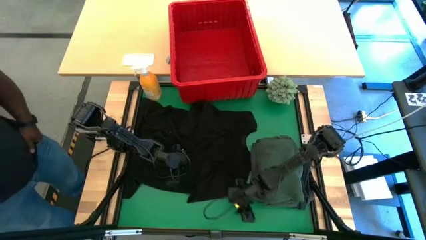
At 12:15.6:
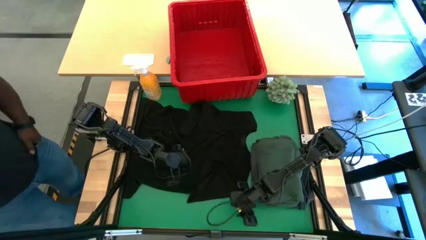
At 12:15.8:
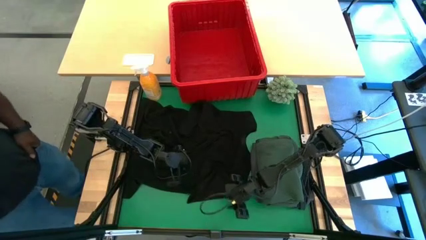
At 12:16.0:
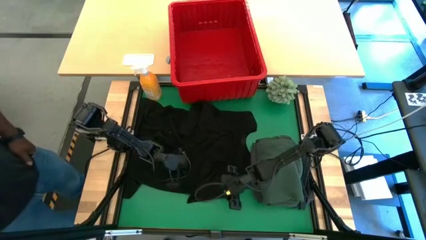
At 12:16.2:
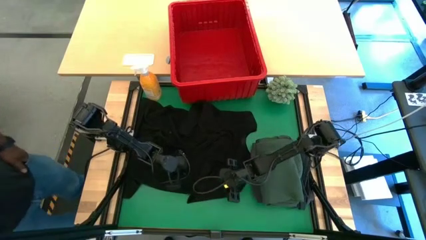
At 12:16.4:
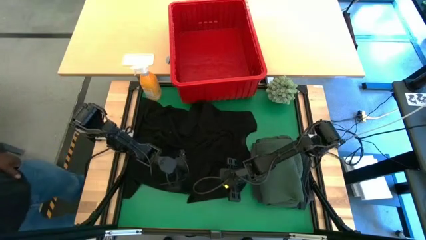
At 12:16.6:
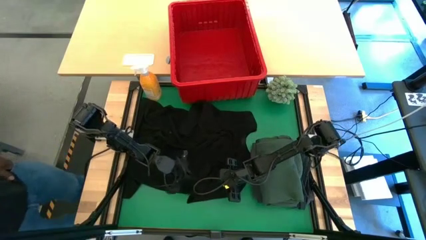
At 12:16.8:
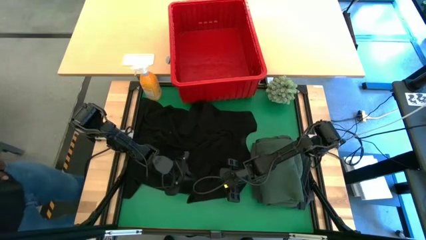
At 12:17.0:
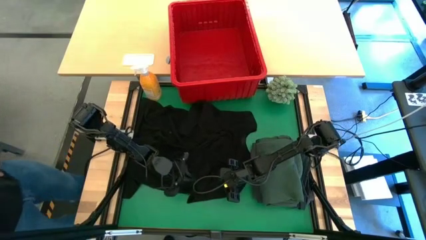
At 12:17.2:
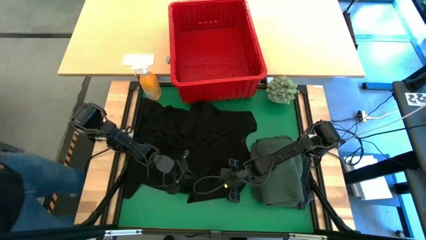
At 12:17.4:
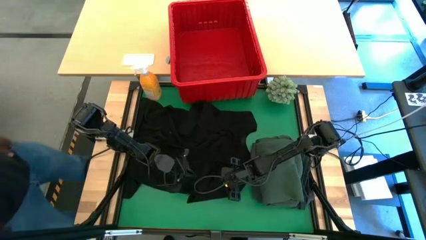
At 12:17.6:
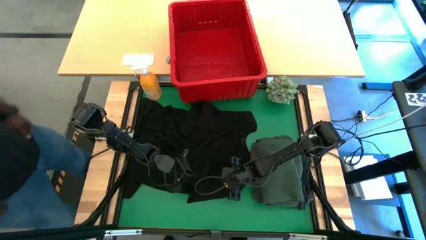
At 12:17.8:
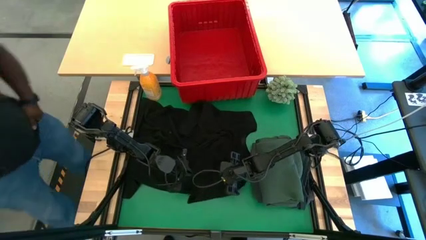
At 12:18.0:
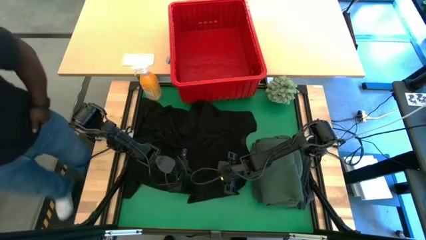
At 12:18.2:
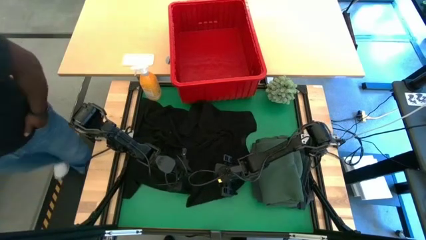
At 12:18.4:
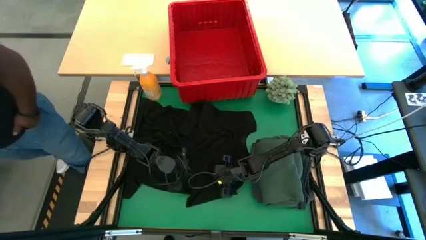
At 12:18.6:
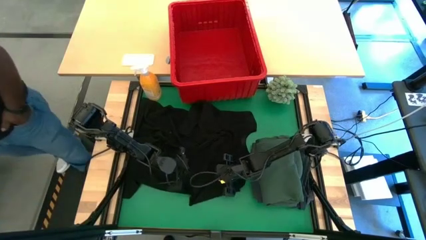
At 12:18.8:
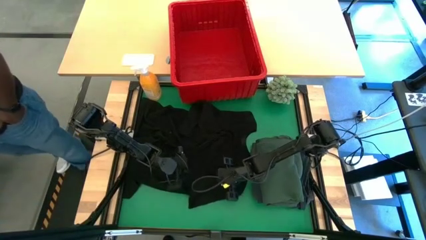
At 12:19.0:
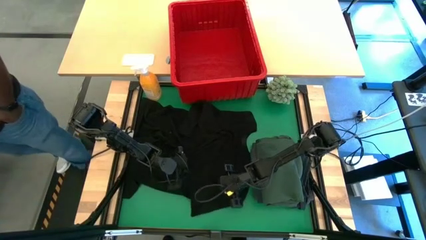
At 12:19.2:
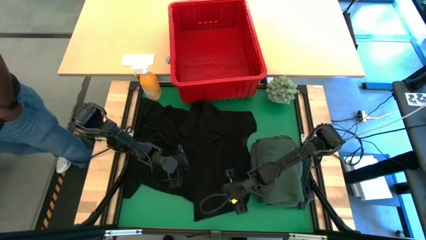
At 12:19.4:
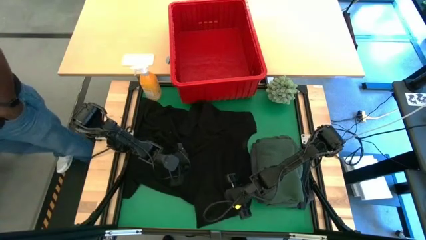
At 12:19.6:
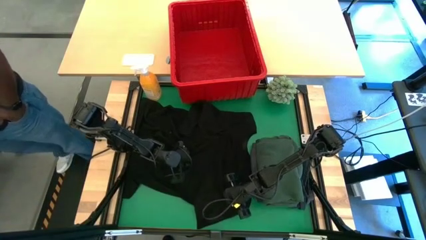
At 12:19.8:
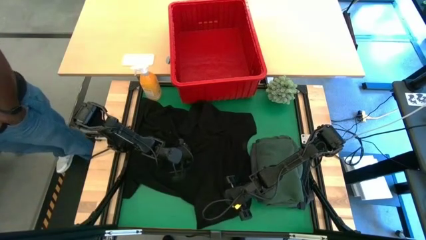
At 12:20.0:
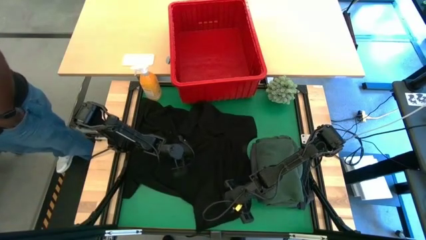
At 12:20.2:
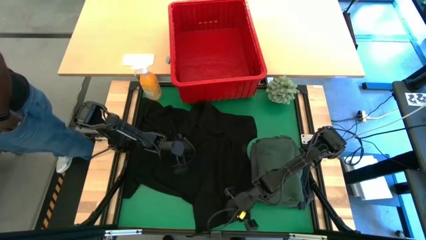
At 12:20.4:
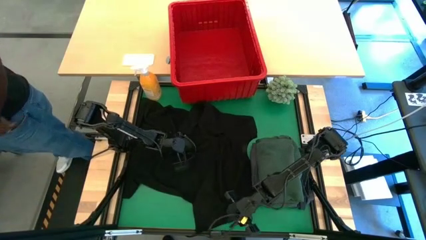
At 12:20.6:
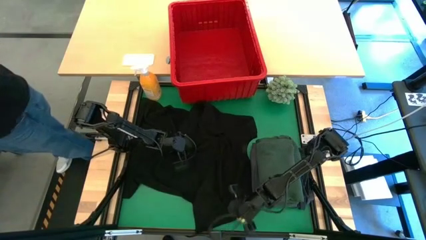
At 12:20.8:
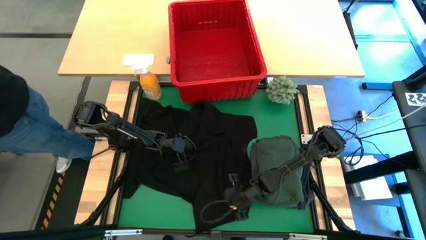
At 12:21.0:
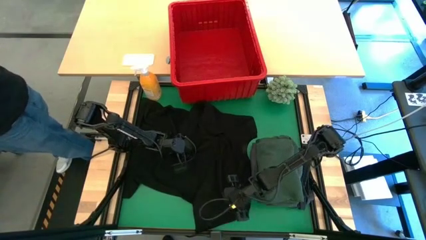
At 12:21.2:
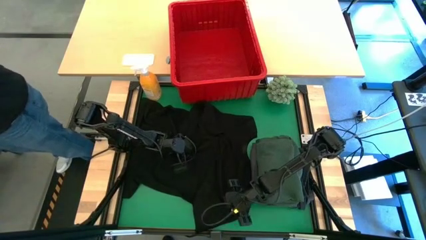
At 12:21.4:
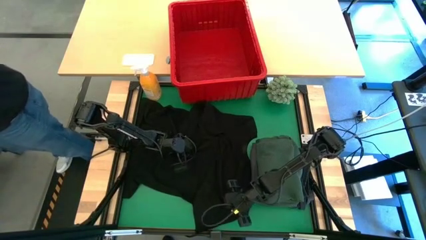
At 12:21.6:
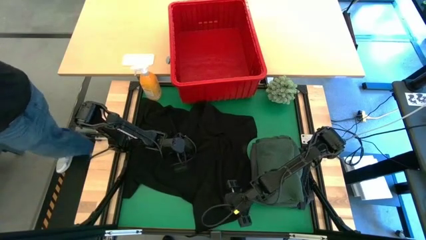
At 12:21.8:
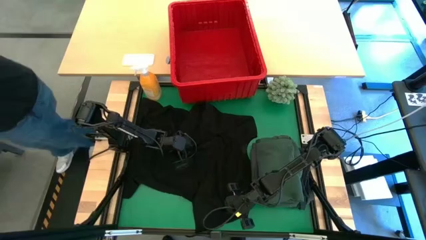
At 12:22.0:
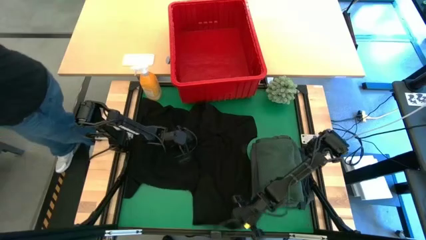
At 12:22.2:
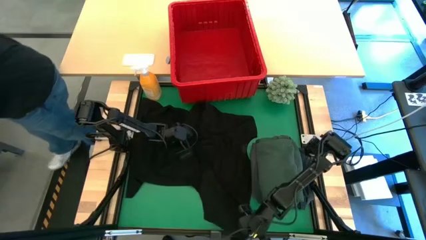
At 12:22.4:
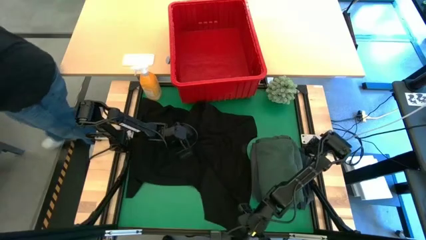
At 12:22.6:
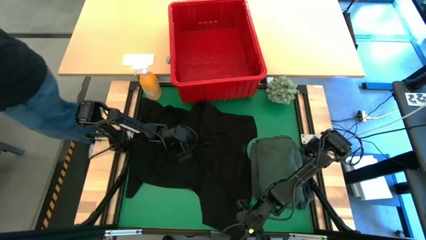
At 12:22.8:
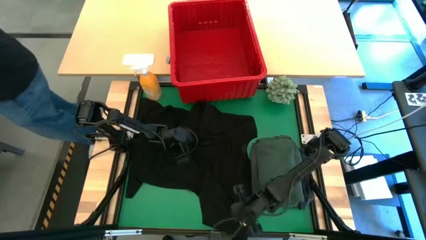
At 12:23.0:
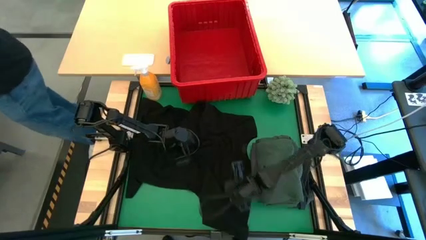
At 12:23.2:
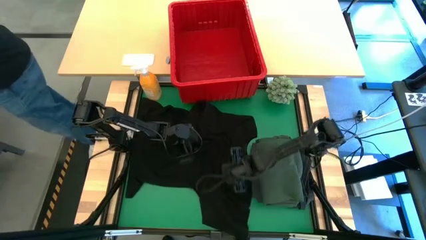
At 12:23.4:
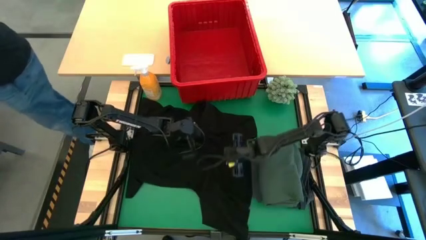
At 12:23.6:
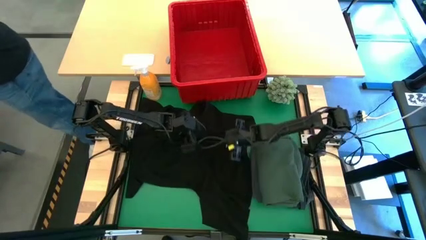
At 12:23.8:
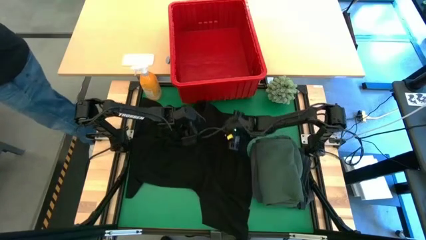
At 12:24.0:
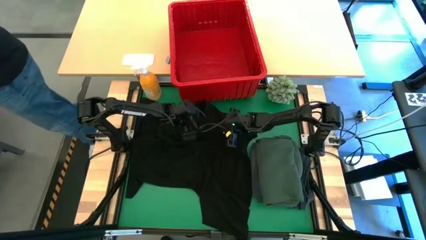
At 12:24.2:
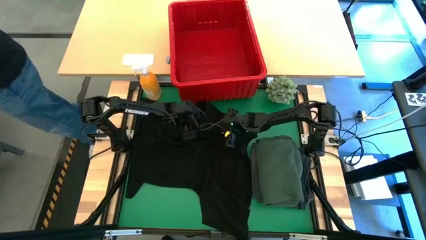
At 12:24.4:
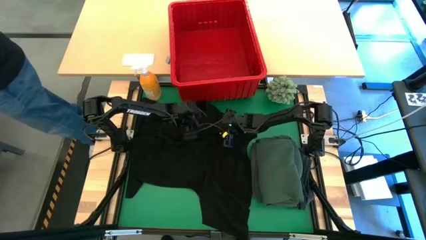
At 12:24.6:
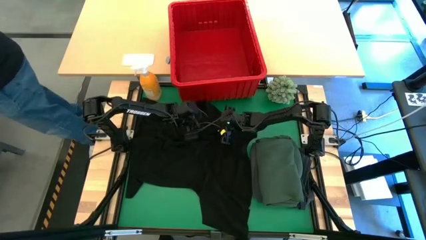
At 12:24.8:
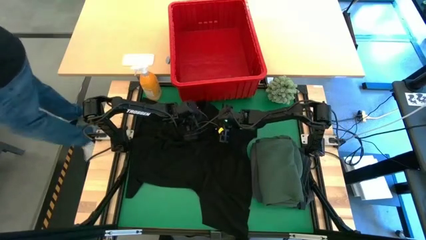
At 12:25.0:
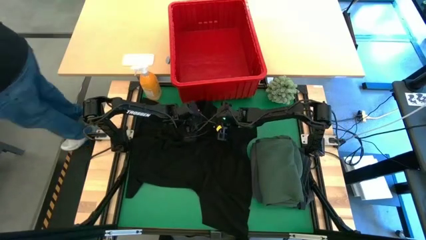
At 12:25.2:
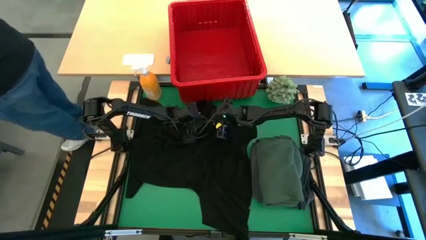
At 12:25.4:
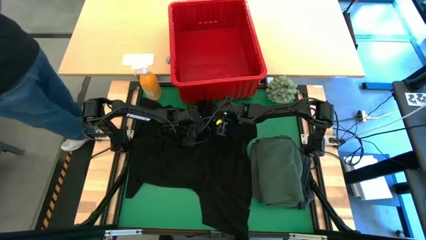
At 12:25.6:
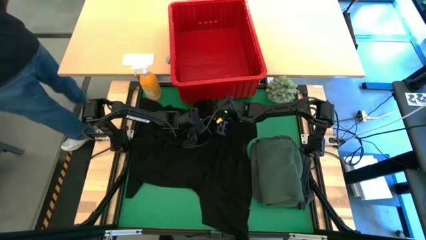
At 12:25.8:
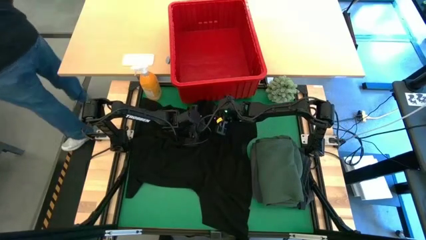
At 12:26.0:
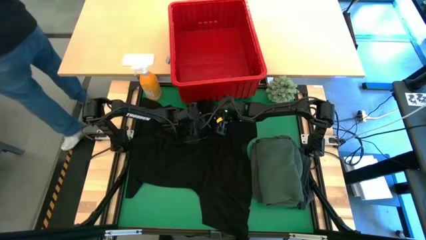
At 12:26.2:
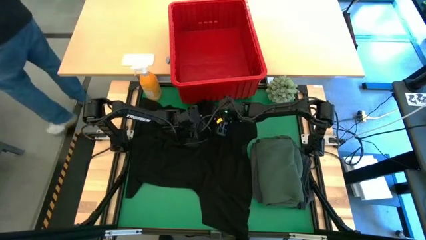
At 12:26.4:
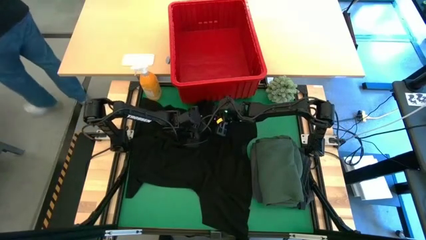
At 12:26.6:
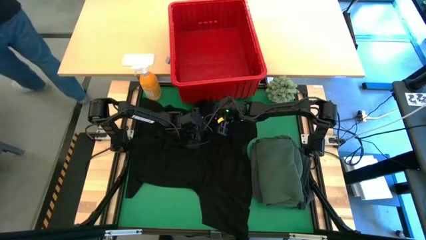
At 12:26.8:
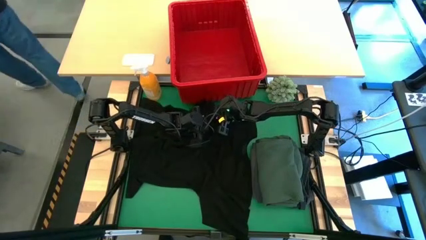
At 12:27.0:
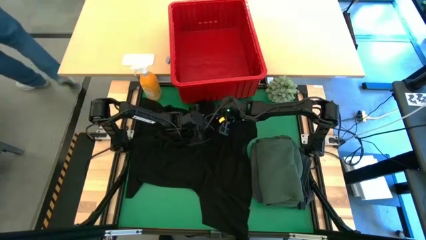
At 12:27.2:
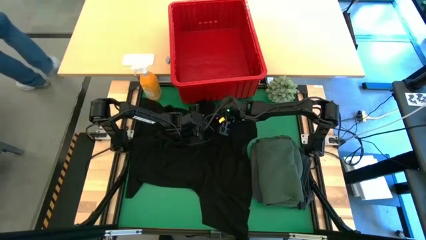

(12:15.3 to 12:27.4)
Task: Fold Laundry from Bin
Fold the black shirt

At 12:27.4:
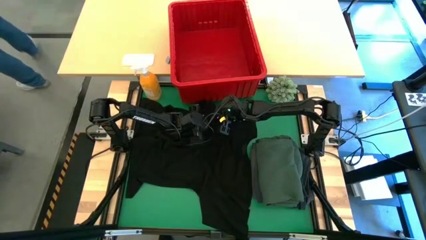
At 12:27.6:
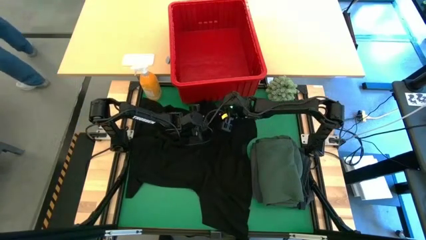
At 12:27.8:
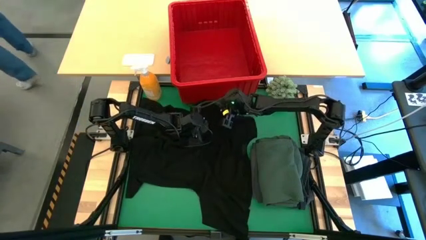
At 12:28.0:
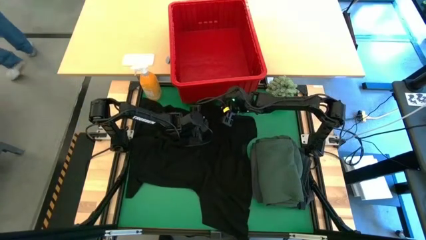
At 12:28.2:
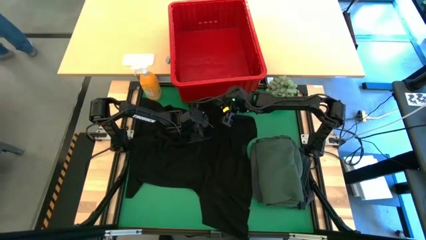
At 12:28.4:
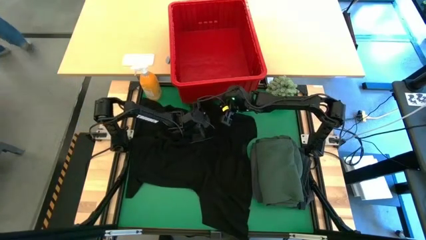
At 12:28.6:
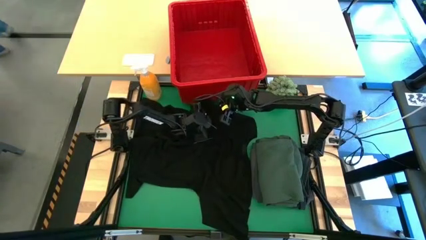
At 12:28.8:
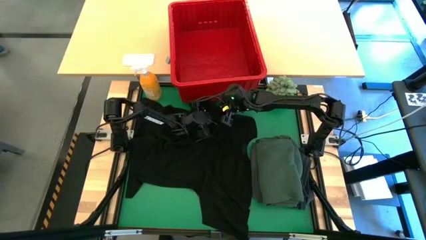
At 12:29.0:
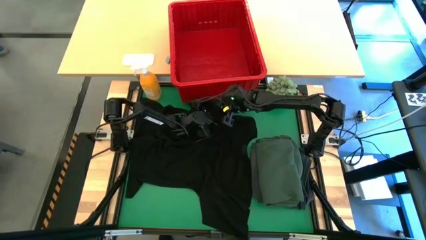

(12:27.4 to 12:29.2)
Fold the black shirt

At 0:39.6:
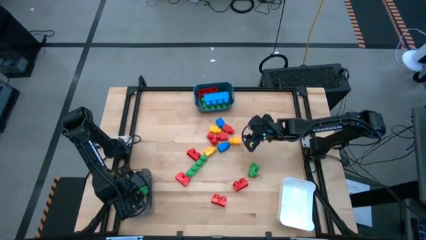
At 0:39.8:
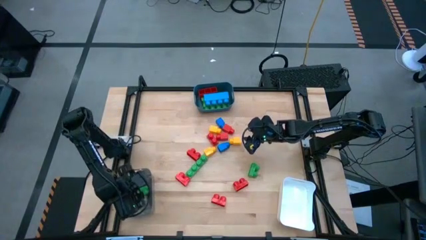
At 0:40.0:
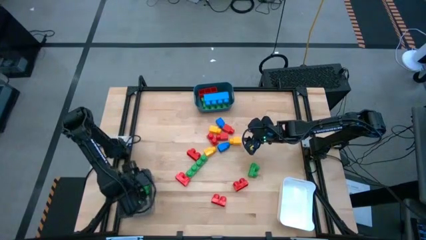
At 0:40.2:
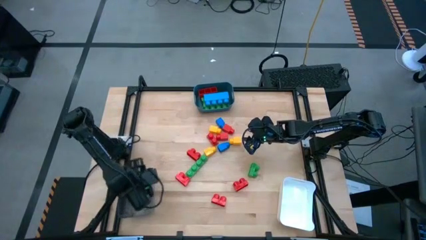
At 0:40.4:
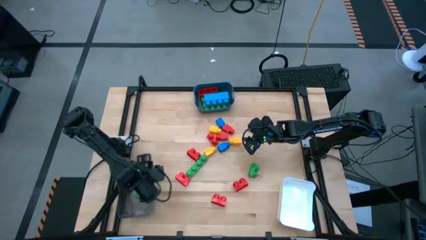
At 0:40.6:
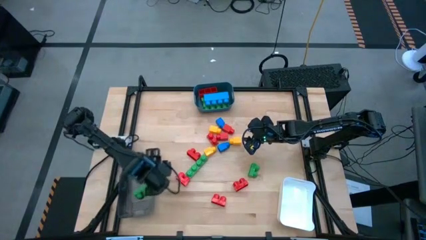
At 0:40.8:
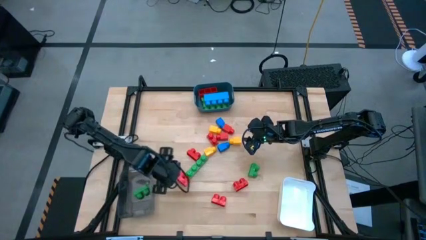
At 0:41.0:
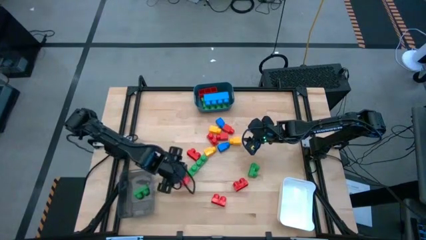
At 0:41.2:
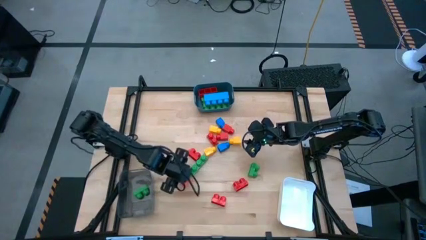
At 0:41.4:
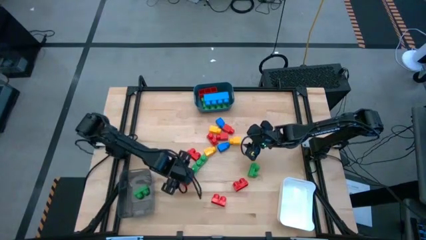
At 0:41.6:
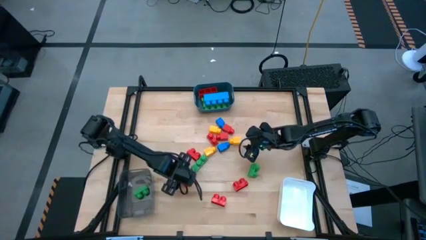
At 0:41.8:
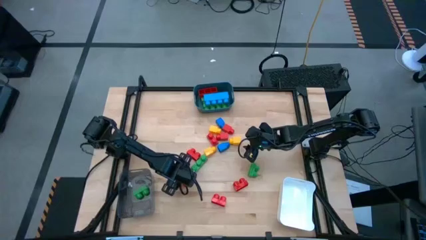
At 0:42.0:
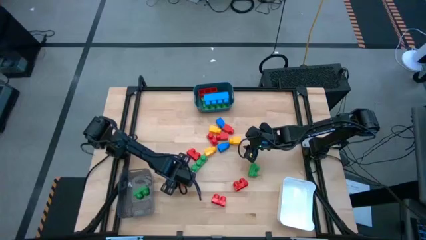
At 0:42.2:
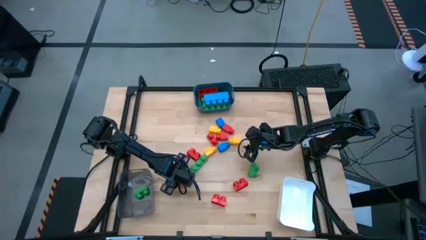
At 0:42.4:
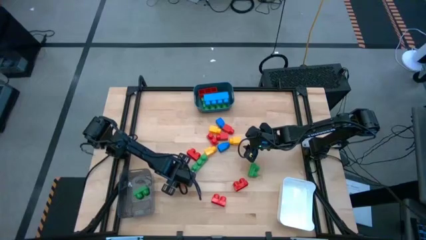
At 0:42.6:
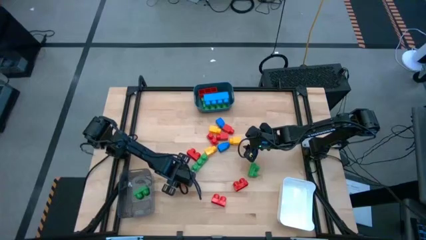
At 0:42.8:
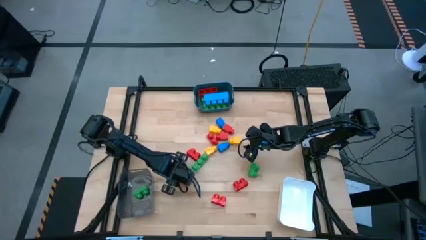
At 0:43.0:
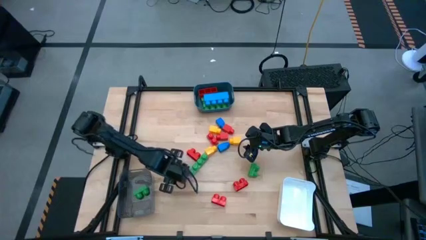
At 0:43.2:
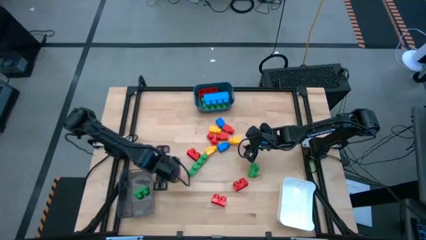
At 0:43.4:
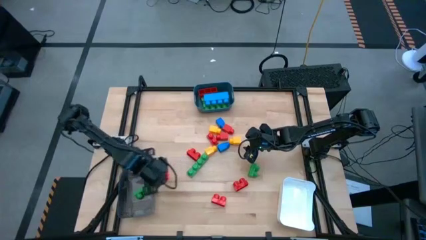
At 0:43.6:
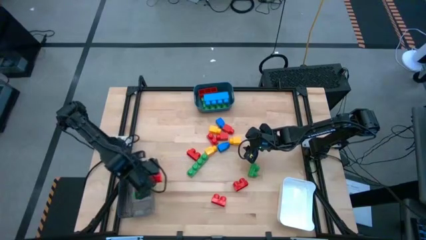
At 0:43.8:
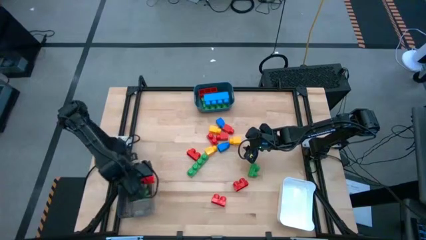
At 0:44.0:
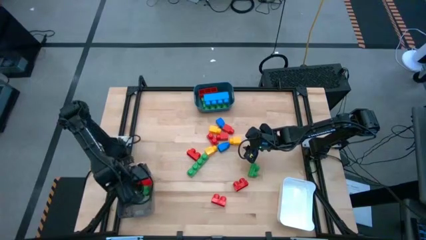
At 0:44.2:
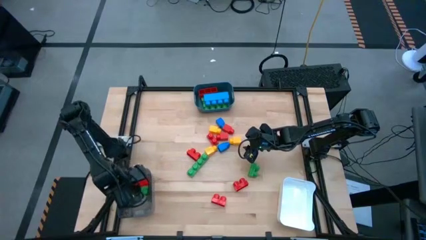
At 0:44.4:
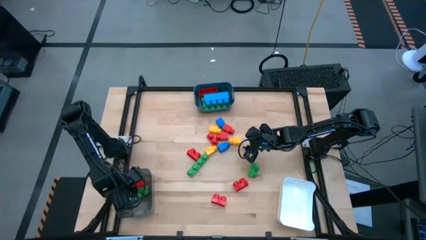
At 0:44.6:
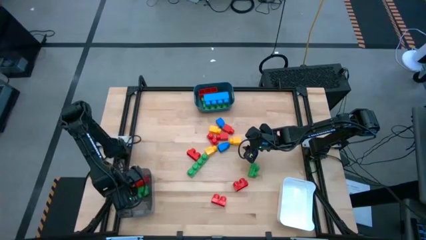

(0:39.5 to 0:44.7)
Task: Sort blocks by size
Put the red game piece into the gray container
